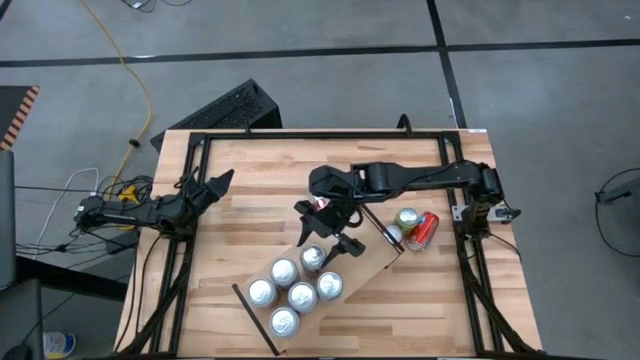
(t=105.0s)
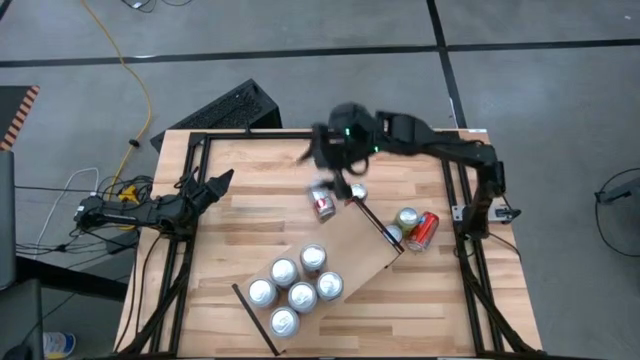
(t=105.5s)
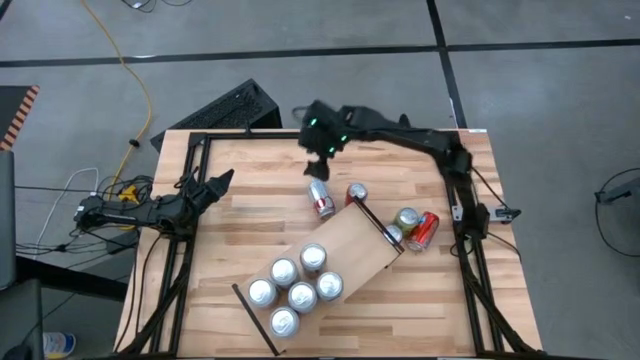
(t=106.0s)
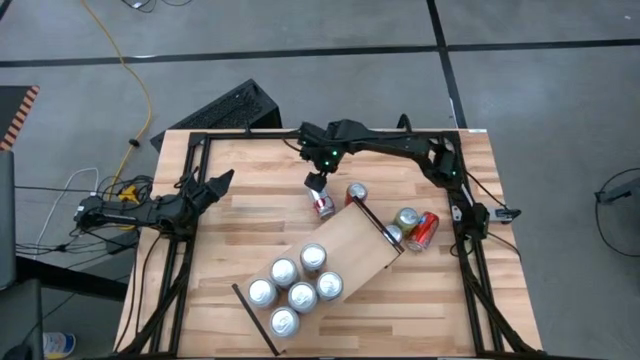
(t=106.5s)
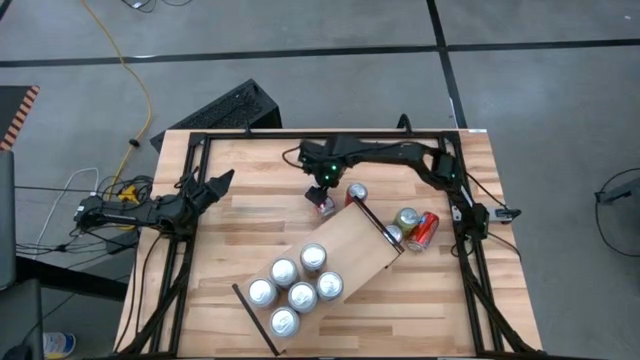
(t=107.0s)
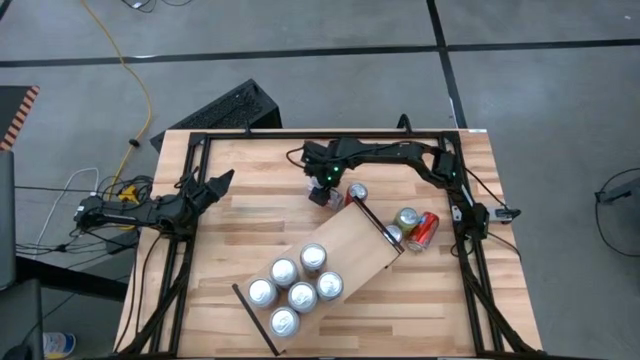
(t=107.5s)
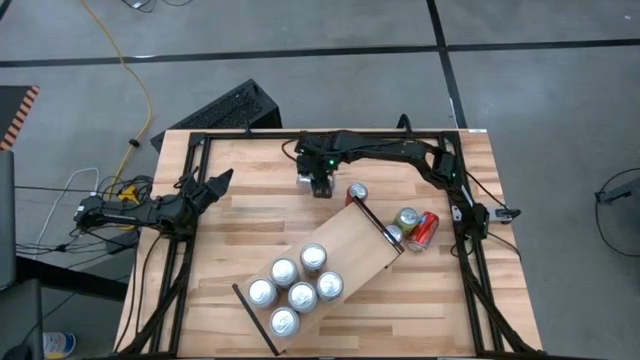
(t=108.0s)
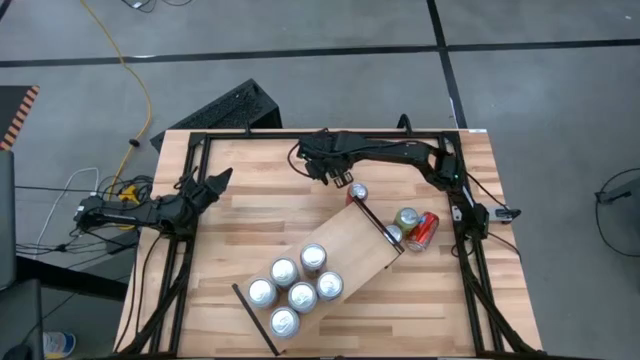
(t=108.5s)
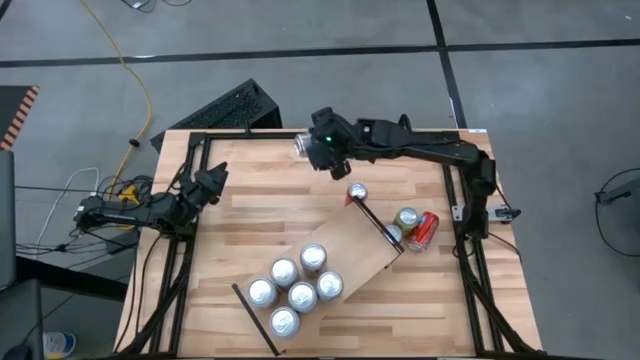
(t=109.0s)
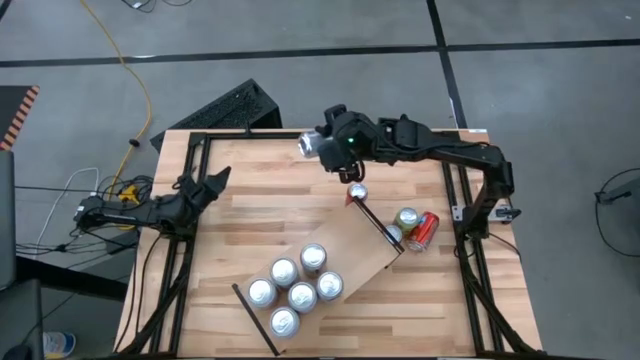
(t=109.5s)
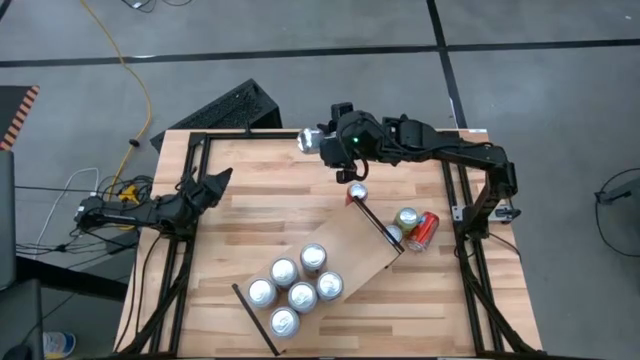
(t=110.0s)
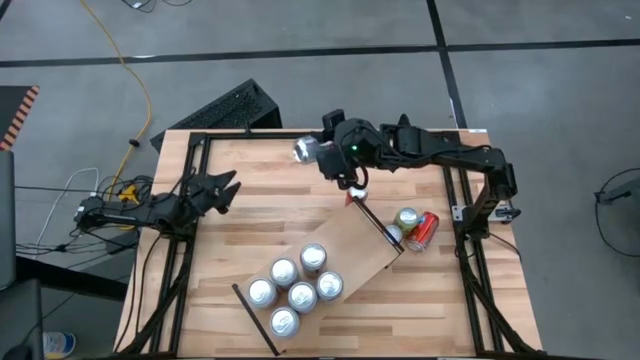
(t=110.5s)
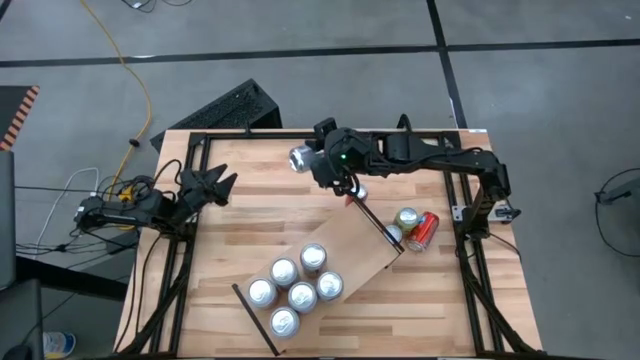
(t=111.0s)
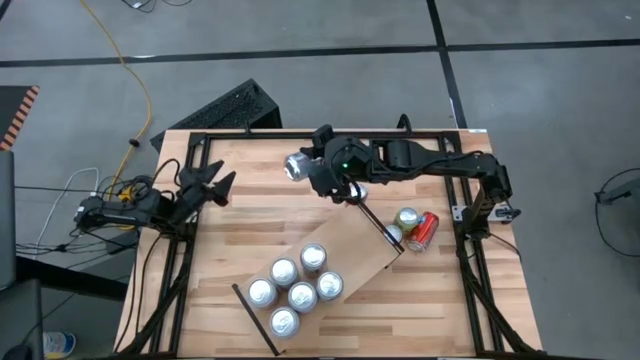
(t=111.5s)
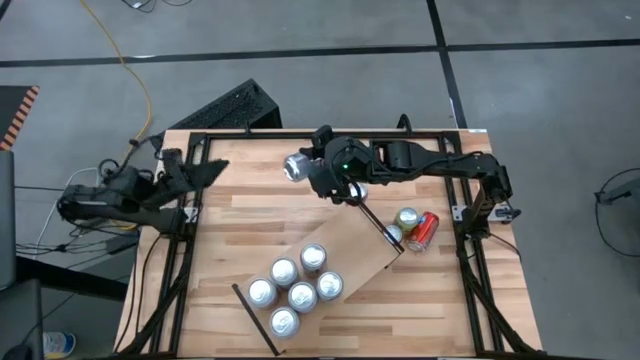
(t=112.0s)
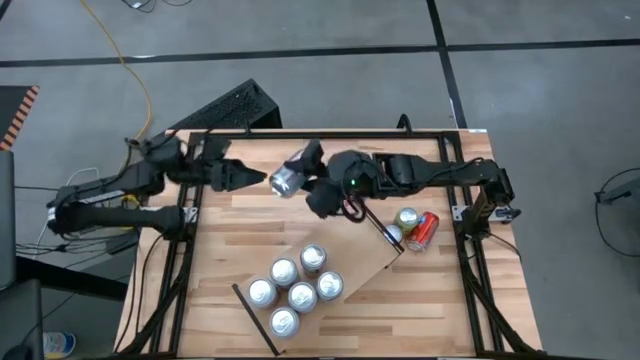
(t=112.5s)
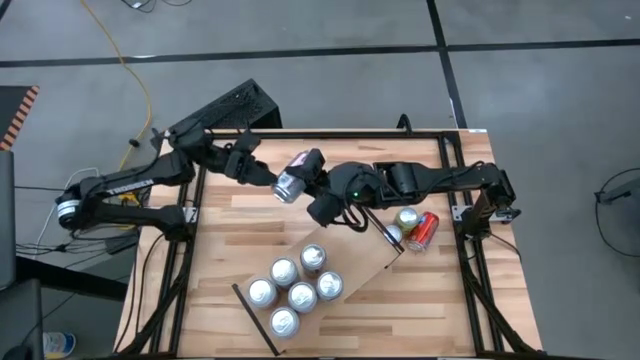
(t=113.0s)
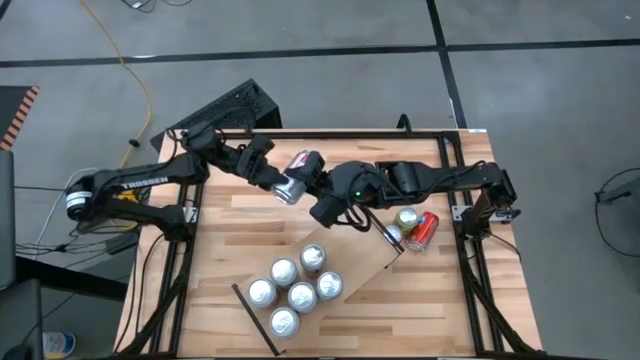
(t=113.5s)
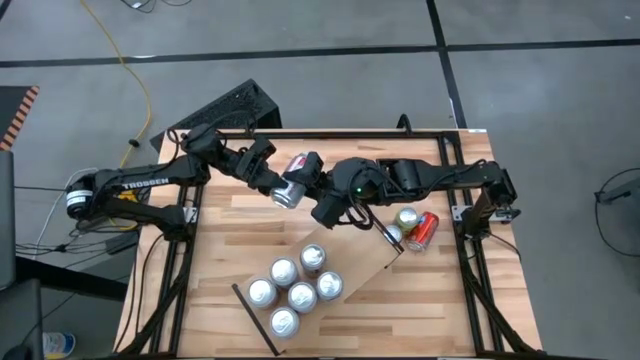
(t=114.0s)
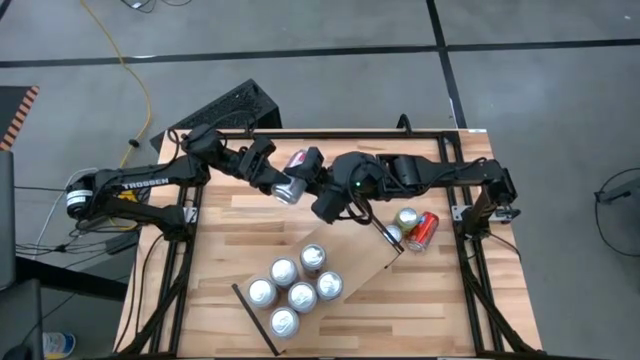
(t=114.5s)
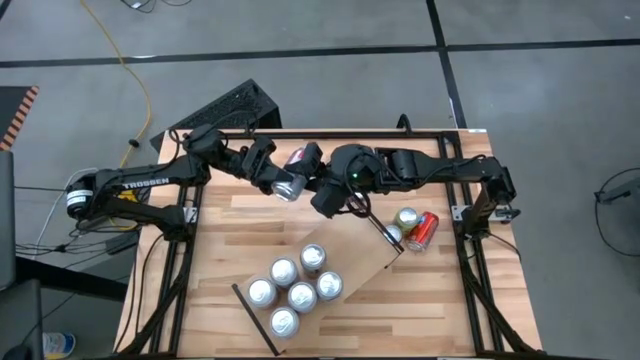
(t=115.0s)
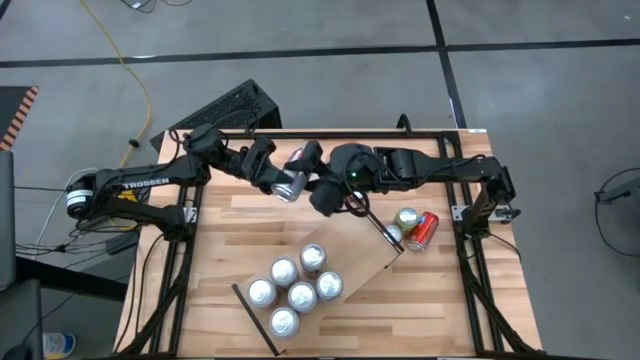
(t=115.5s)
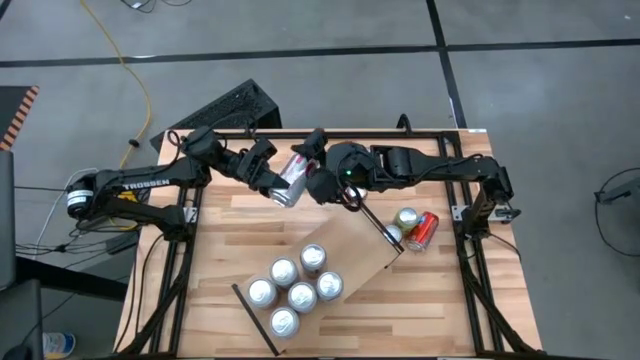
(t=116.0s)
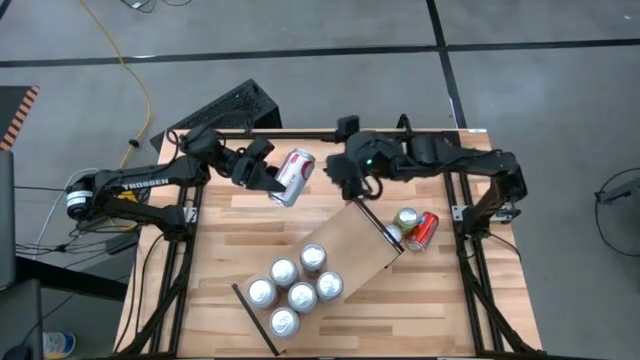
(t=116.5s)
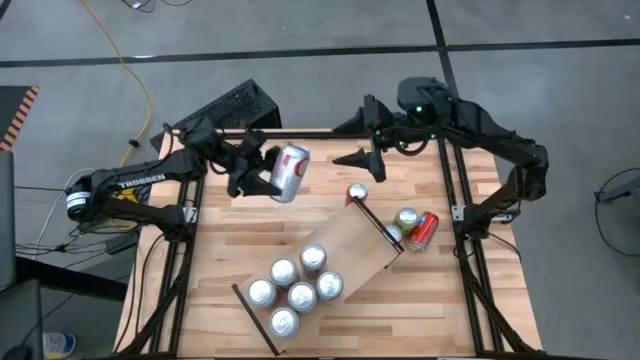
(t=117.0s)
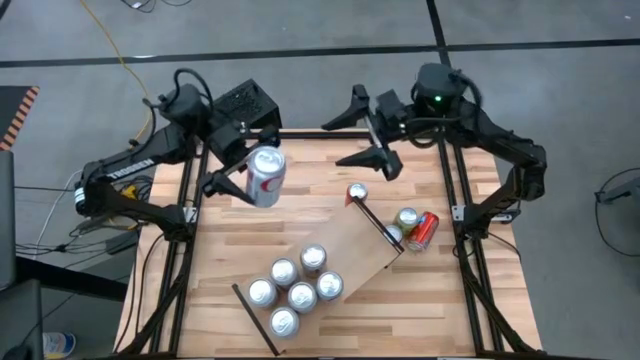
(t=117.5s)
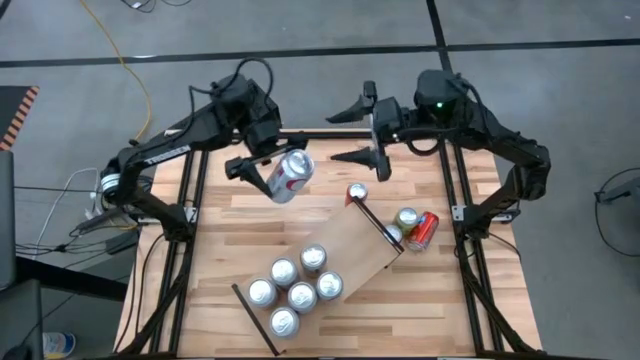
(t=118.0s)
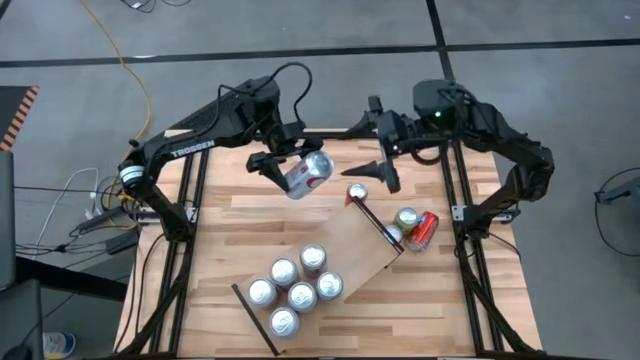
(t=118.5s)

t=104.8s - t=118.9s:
Task: Place canned beverage on shelf
Put the red silver soda can on the shelf aligned with the other red silver soda can

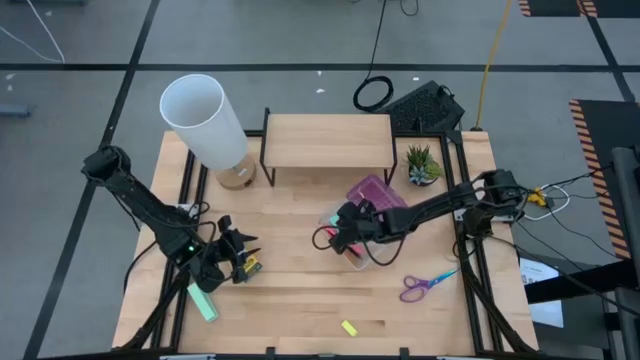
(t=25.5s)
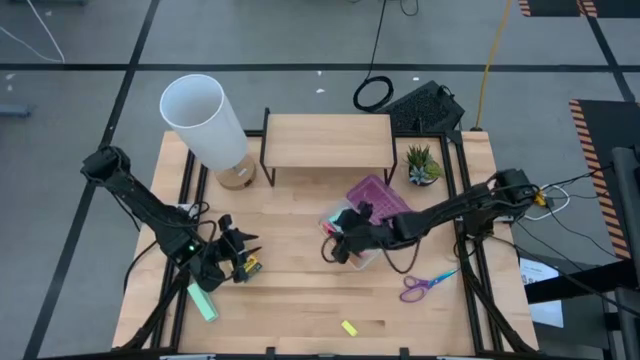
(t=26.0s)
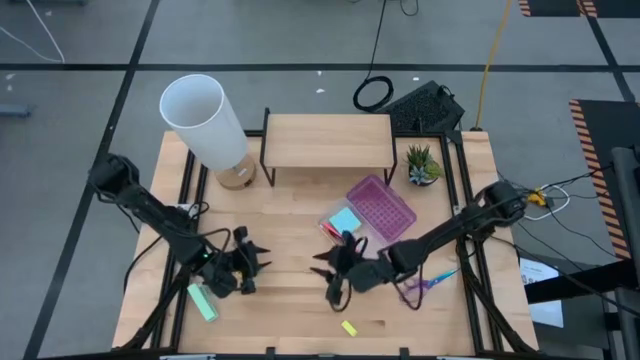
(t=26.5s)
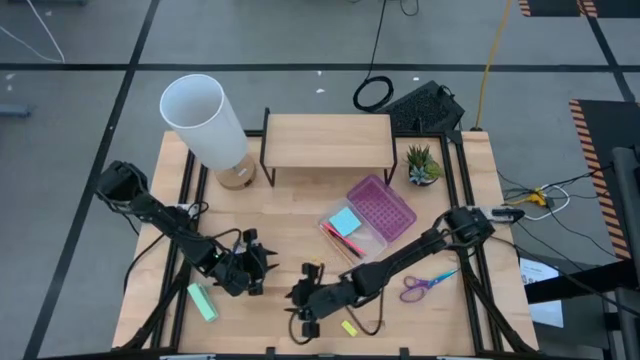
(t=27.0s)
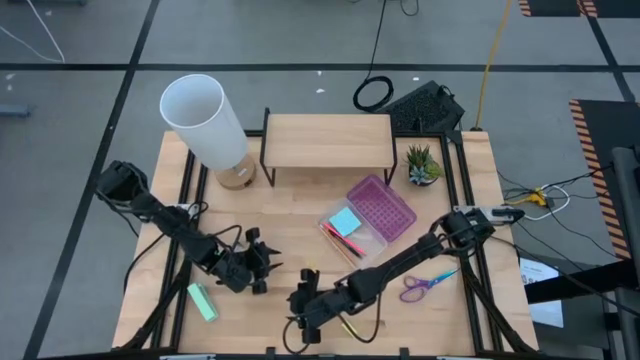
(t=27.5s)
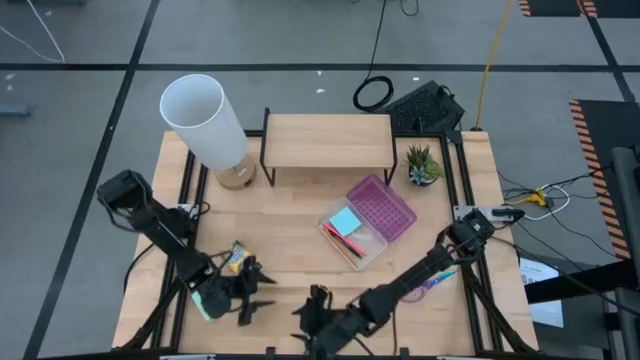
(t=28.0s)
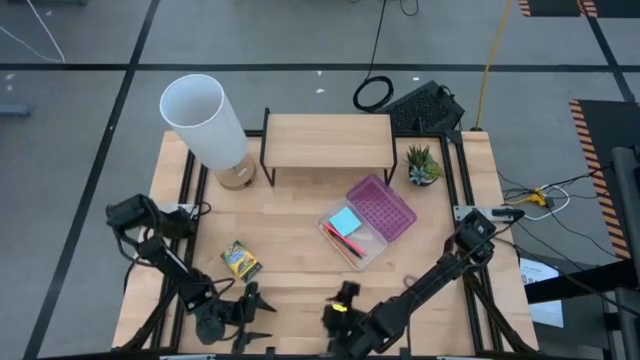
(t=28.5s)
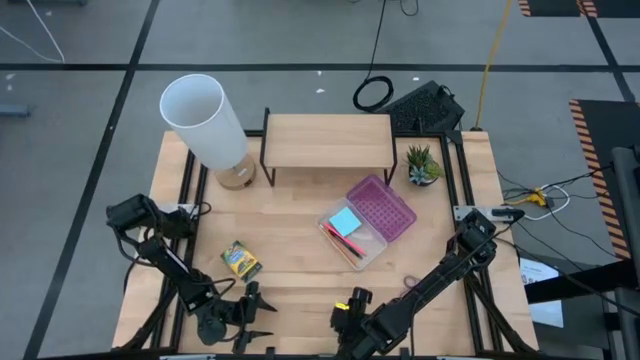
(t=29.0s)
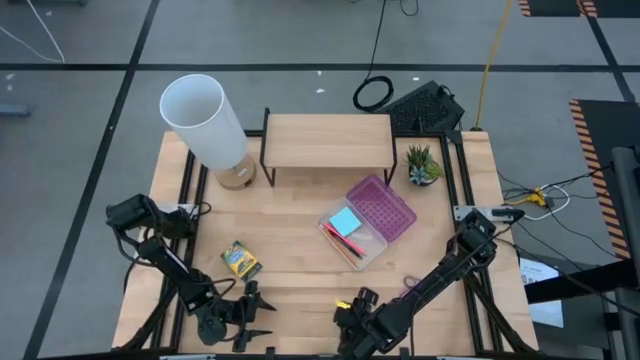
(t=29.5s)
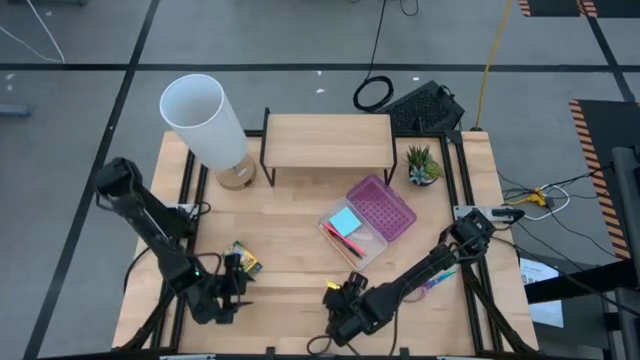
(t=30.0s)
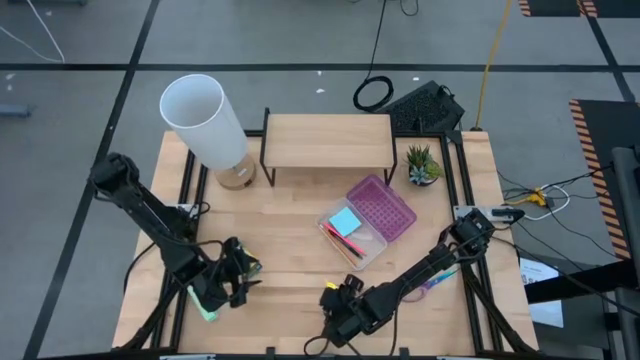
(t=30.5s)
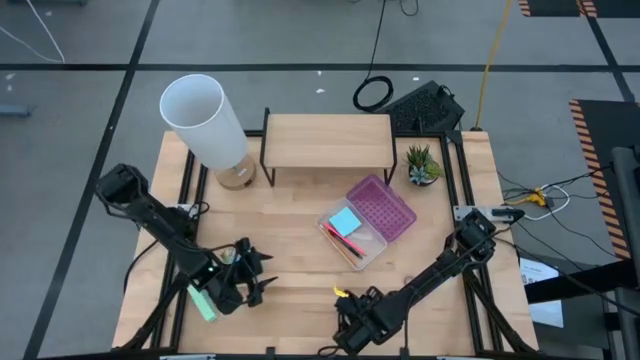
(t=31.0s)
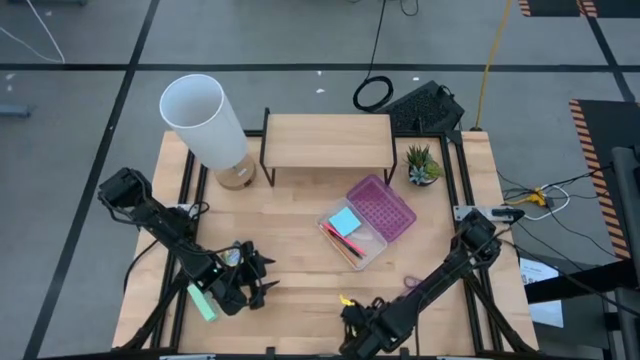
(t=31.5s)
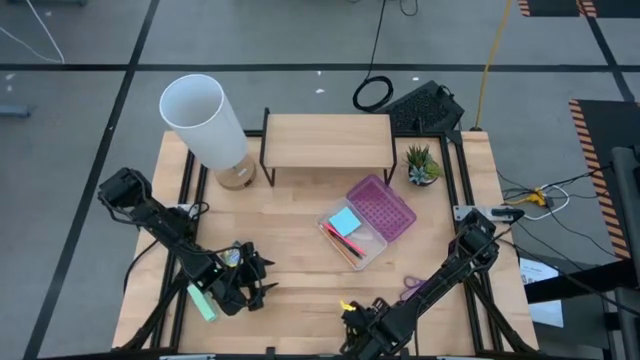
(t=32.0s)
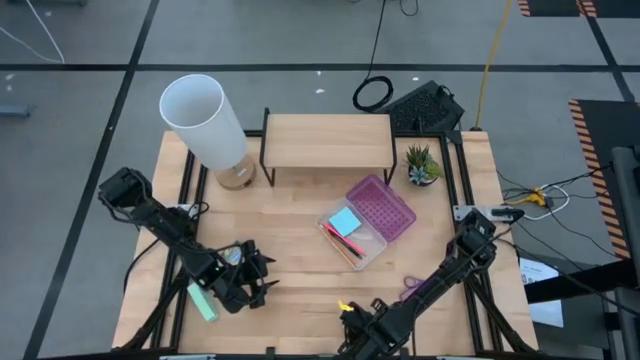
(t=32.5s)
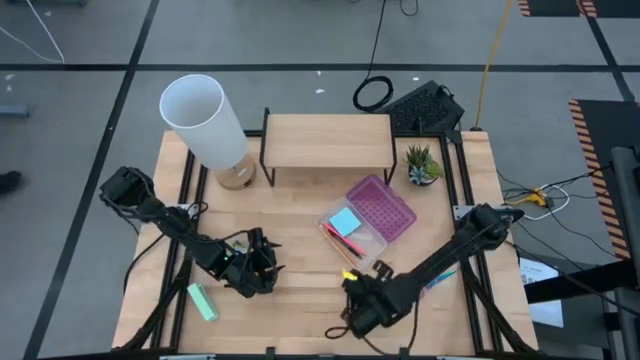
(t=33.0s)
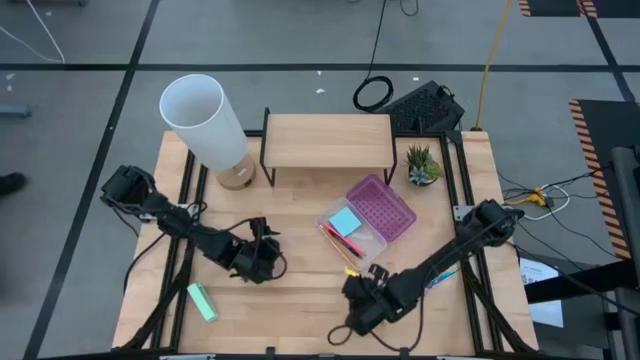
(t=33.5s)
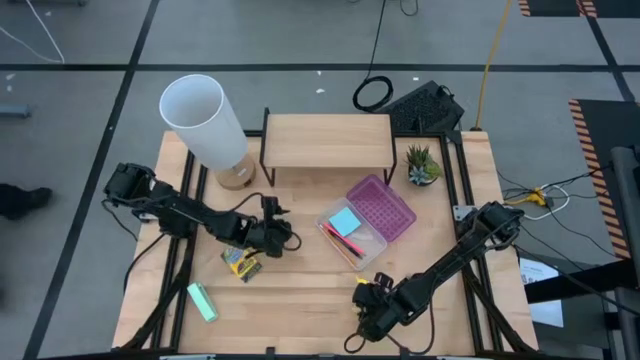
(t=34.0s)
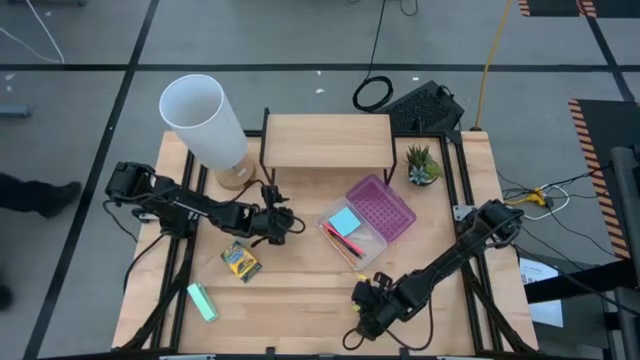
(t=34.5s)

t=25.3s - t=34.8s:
Task: Pack school essentials
Put the yellow sticky notes into the transparent violet supply box
